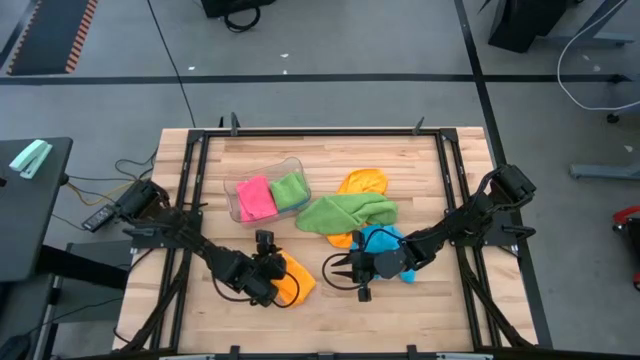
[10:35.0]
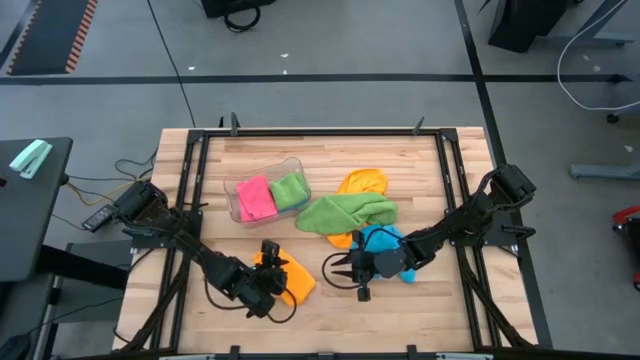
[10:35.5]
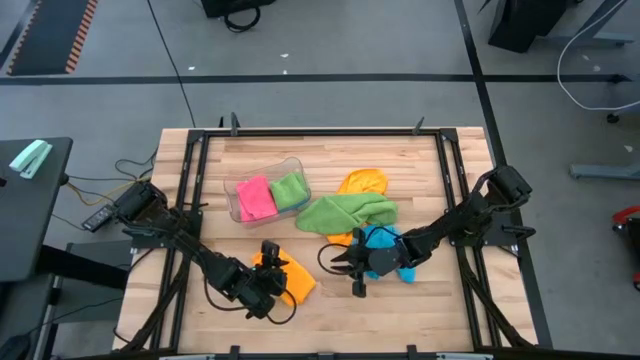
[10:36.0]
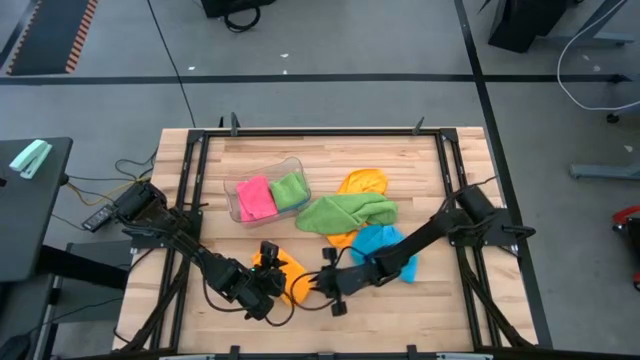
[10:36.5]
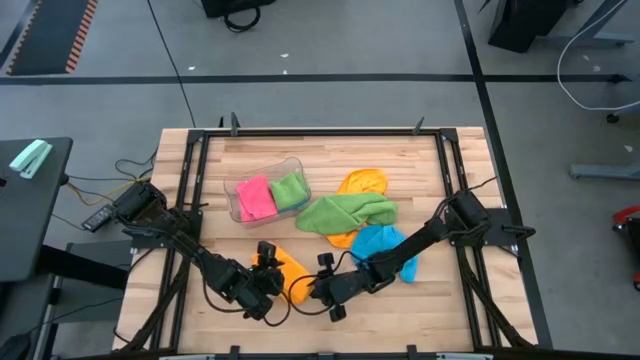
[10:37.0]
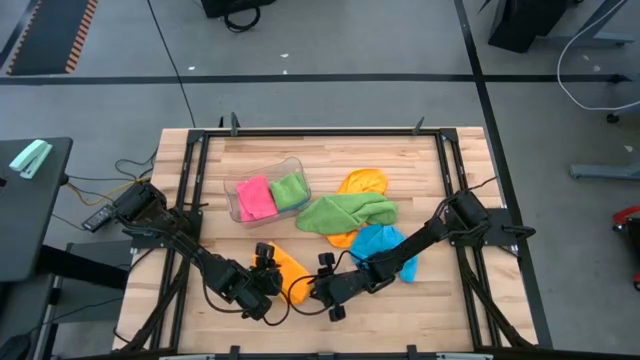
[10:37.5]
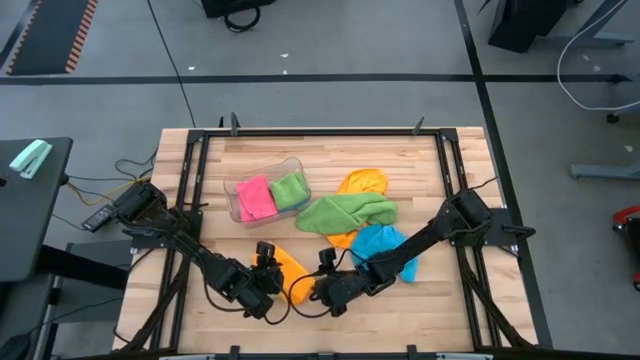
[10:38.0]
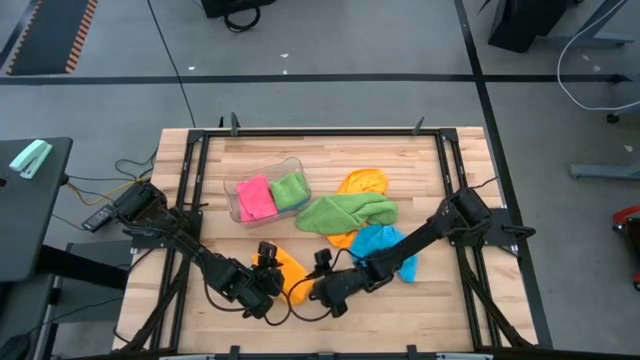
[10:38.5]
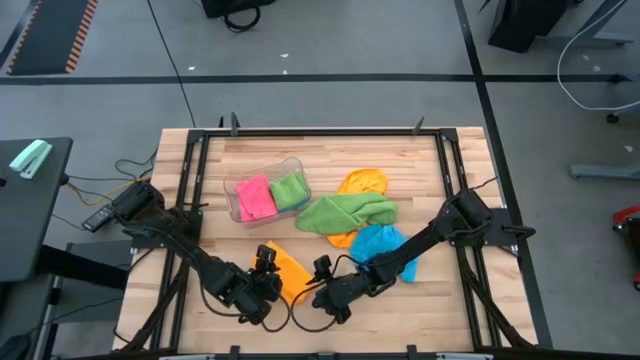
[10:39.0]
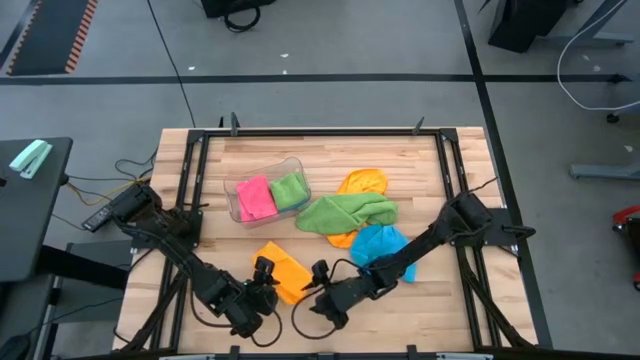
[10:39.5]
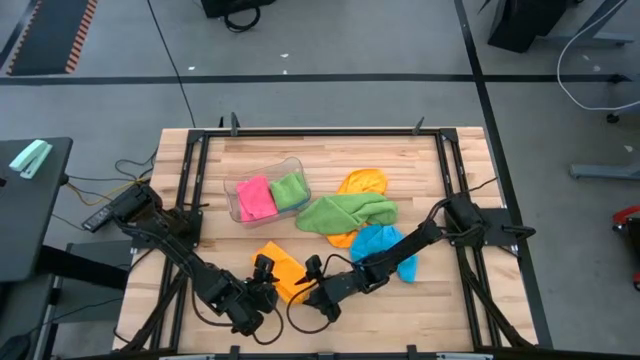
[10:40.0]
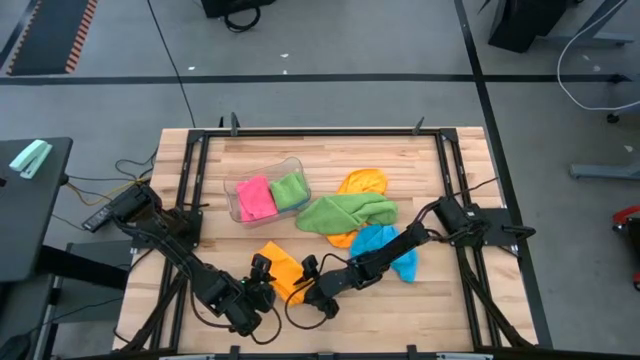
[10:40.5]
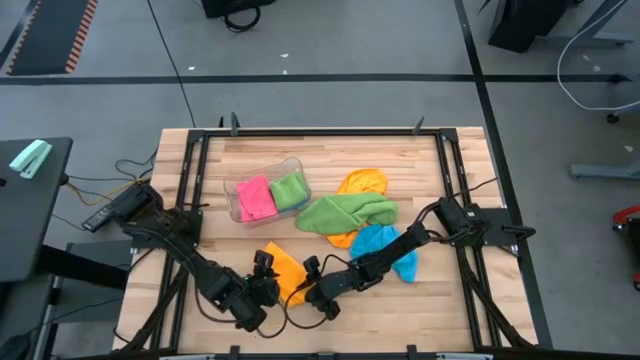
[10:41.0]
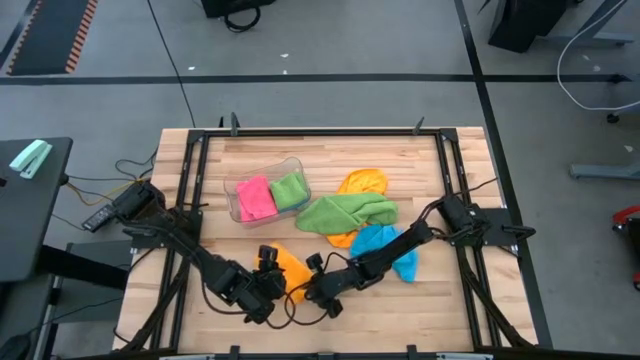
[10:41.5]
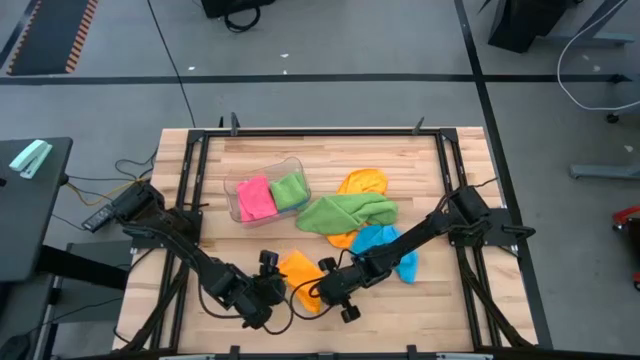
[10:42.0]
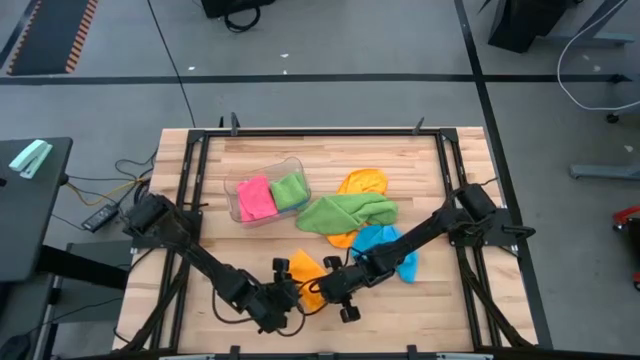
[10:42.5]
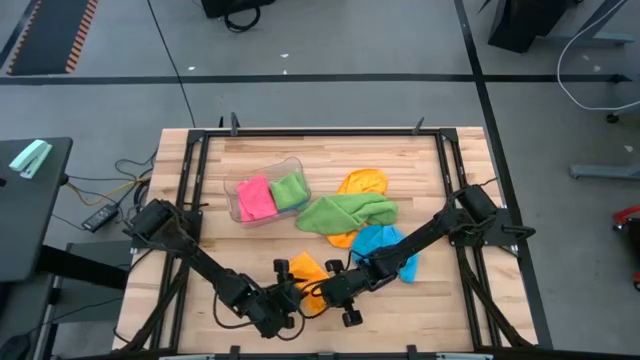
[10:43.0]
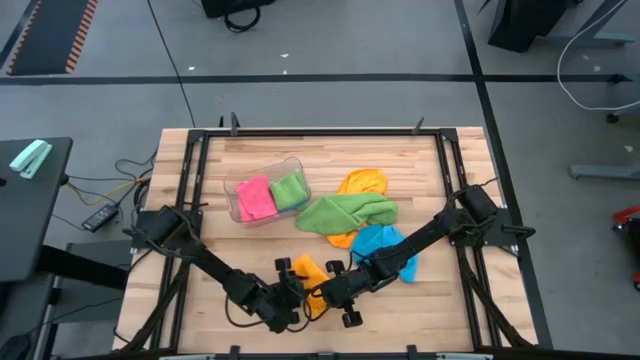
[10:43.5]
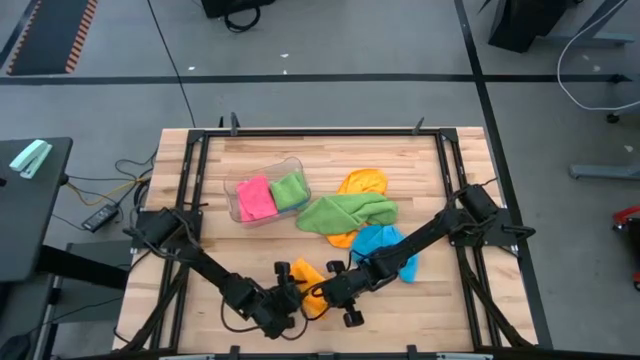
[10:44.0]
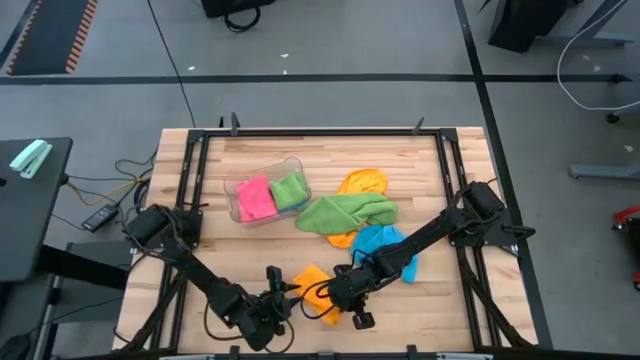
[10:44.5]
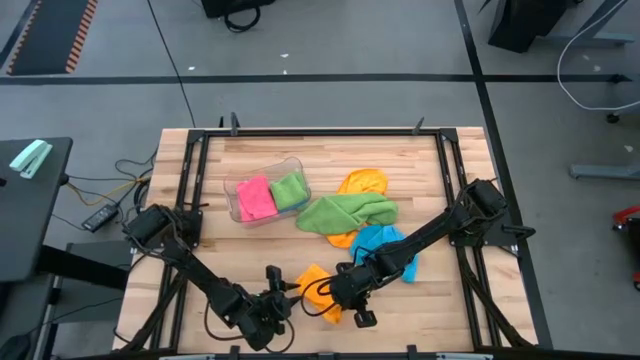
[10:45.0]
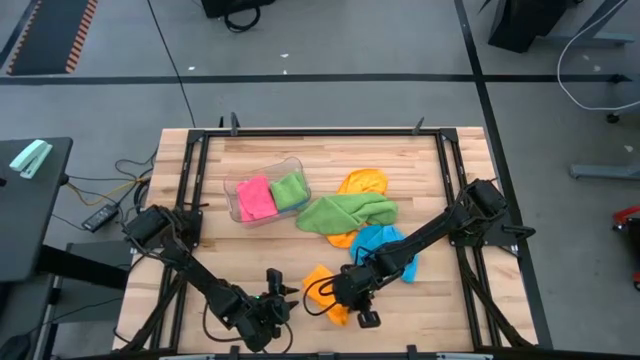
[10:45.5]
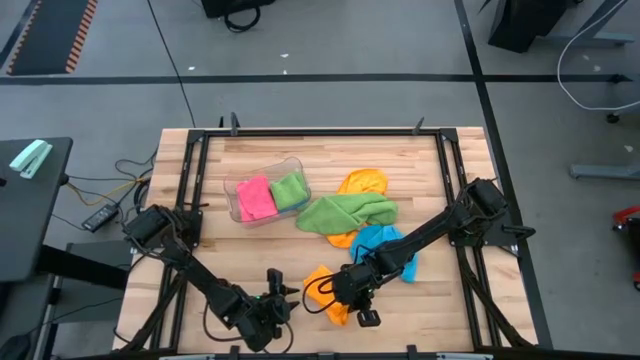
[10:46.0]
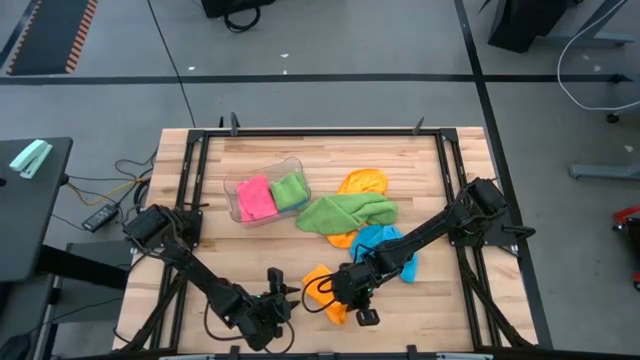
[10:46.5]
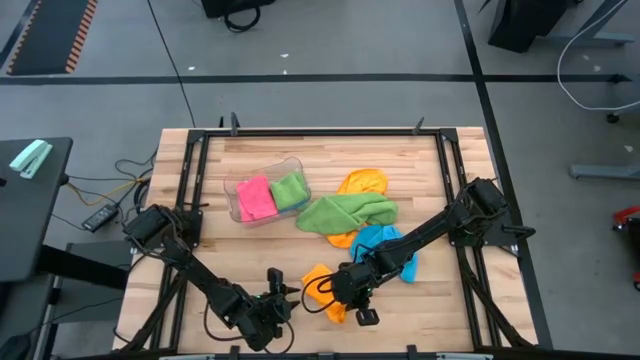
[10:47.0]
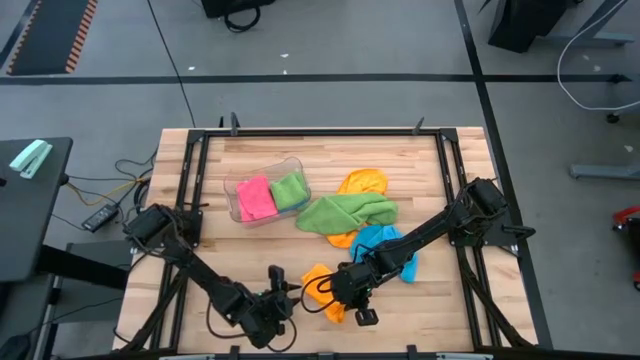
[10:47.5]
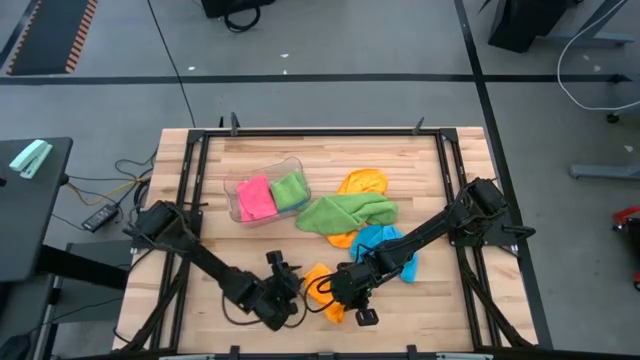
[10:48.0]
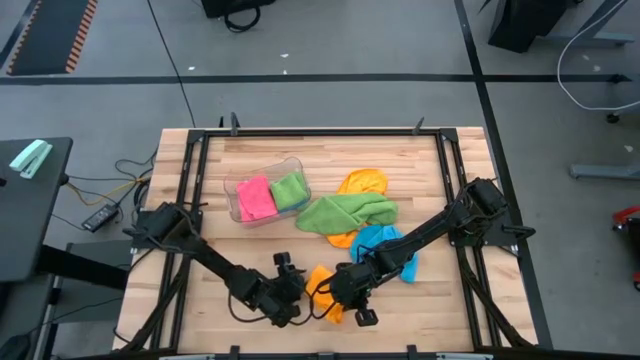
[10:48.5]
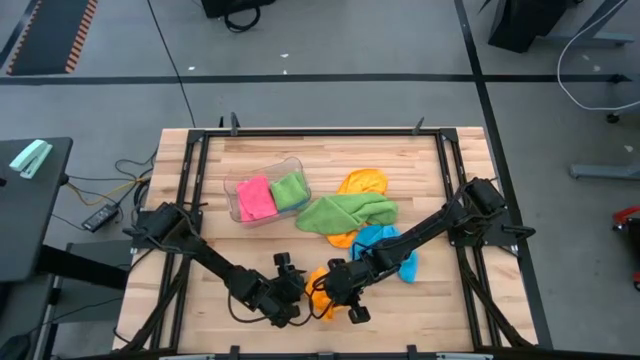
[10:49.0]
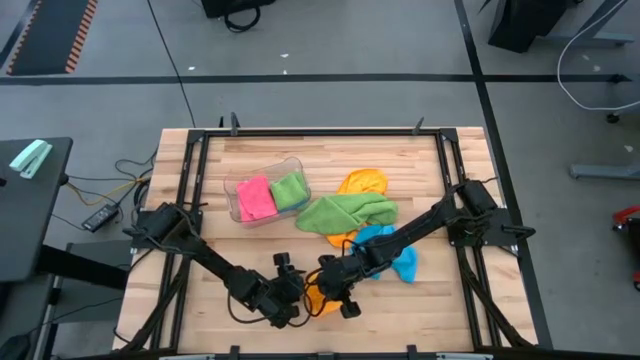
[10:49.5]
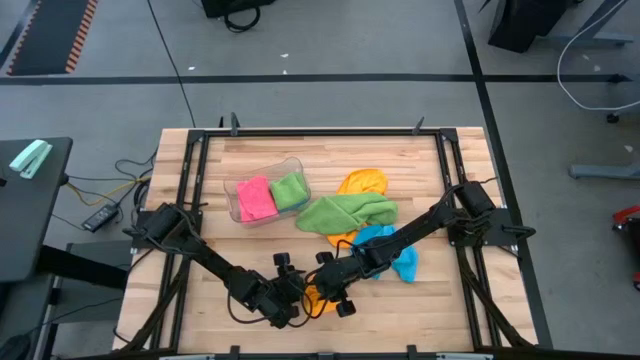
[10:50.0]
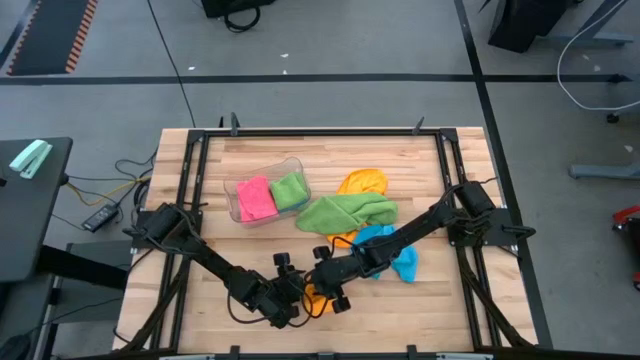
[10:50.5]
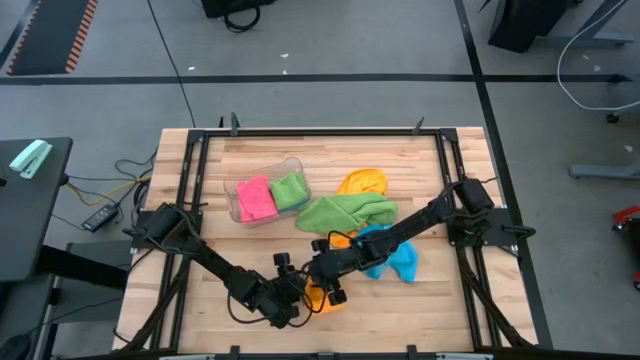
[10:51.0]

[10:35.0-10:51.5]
Task: Fold microfiber towels
Fold the bottom yellow microfiber towel

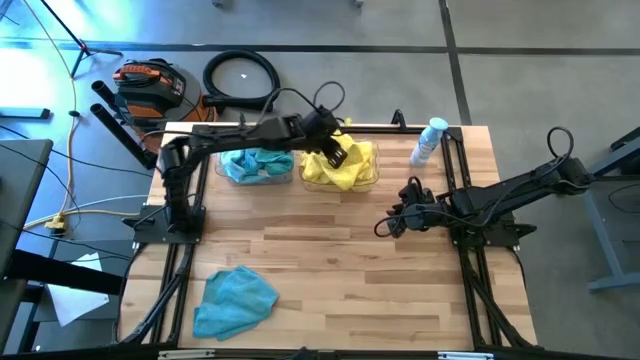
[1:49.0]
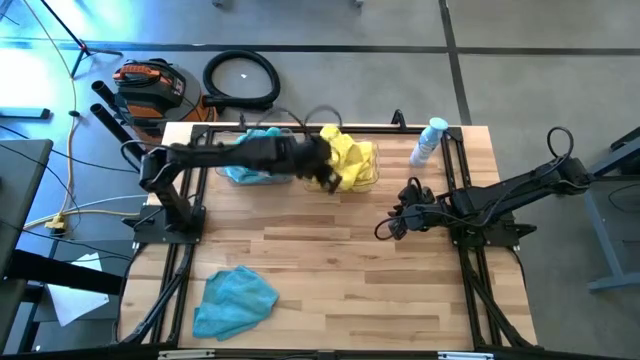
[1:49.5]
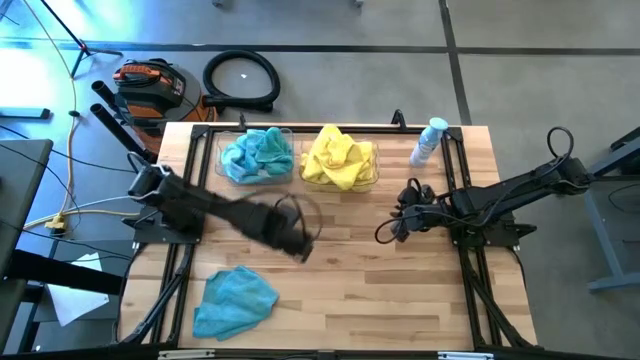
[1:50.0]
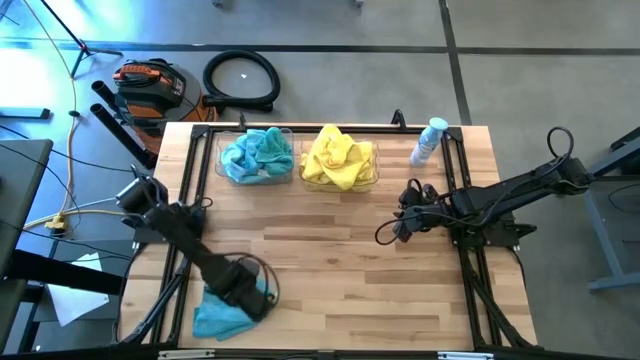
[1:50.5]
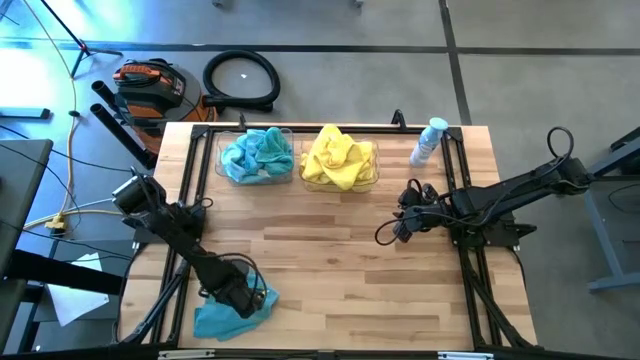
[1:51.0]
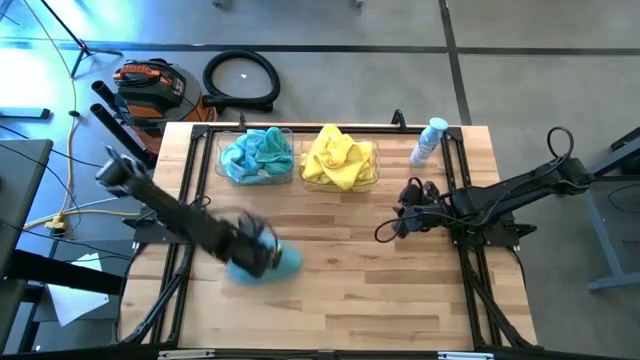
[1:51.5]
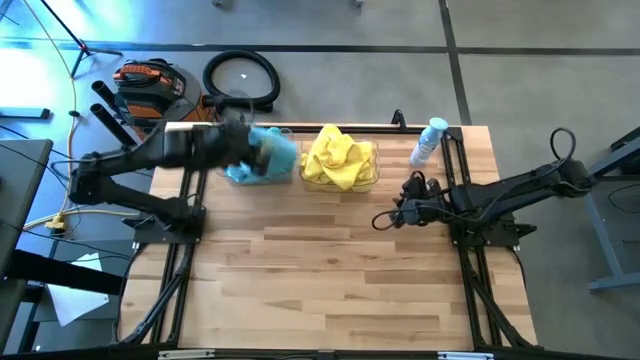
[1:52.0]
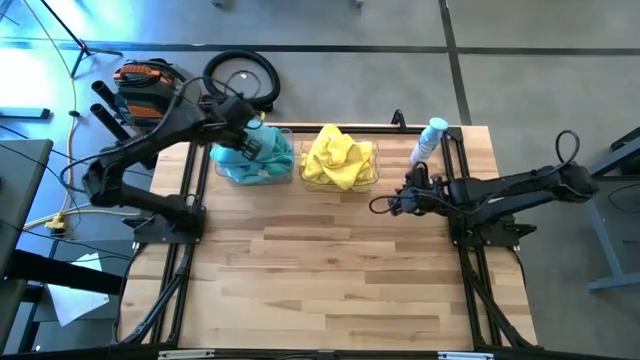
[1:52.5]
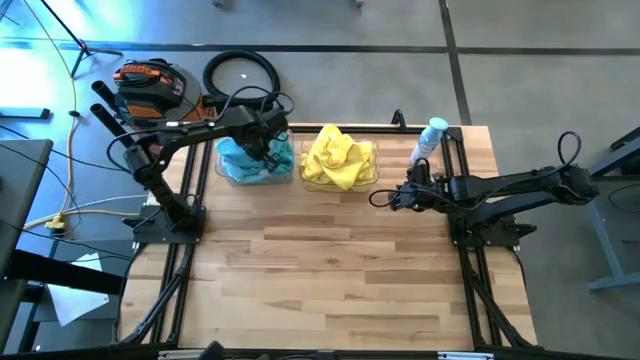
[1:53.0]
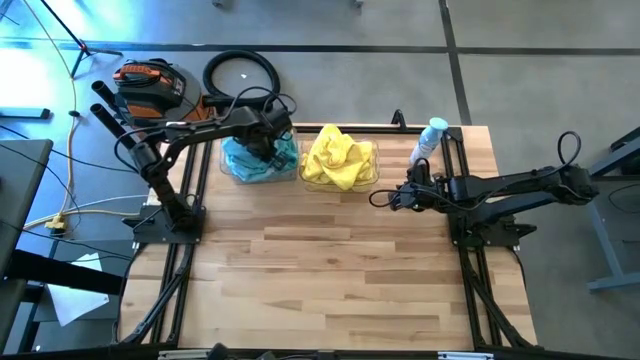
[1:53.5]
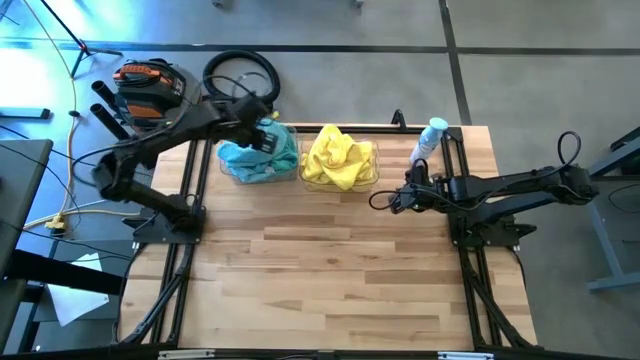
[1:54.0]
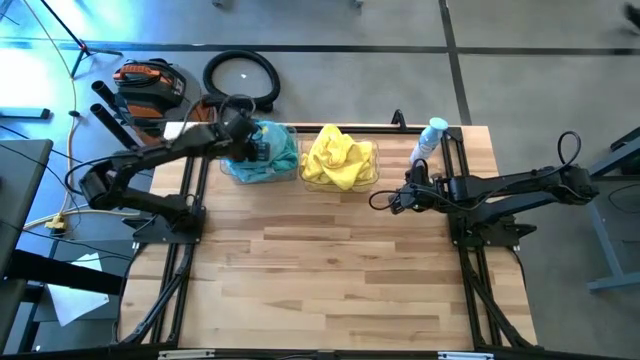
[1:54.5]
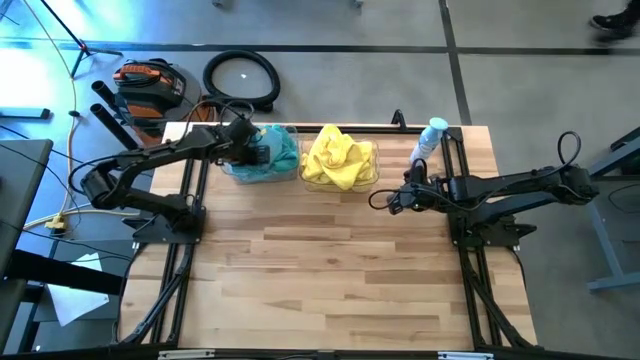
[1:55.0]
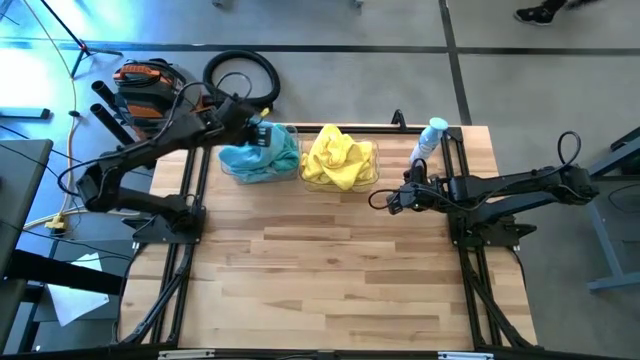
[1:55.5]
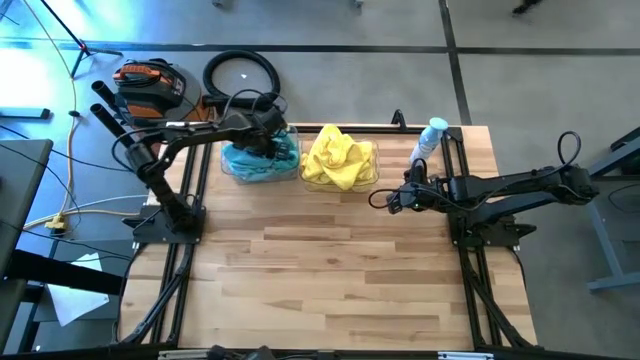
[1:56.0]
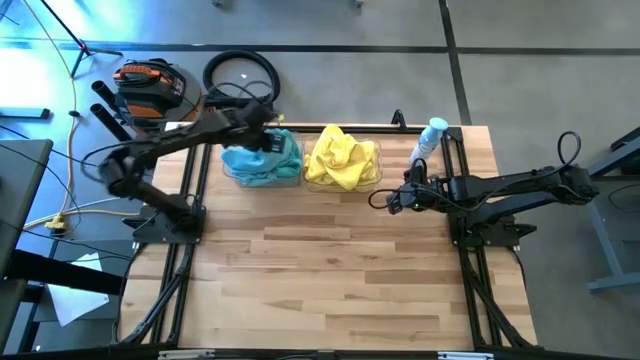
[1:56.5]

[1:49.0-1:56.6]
Task: Sort microfiber towel by color & place in baskets
Put the blue towel into the left transparent bin
